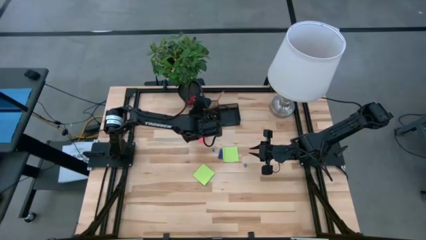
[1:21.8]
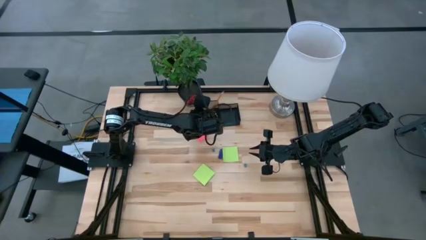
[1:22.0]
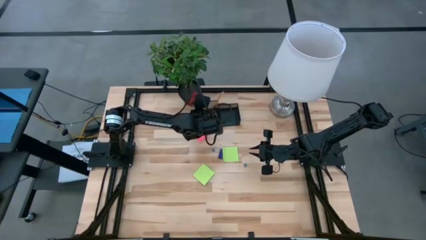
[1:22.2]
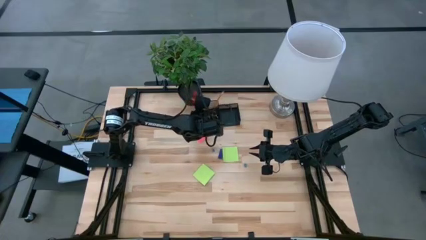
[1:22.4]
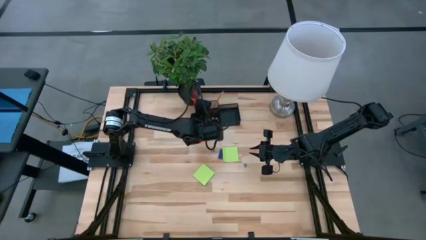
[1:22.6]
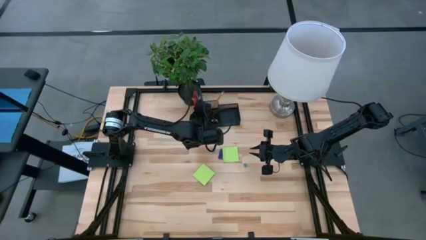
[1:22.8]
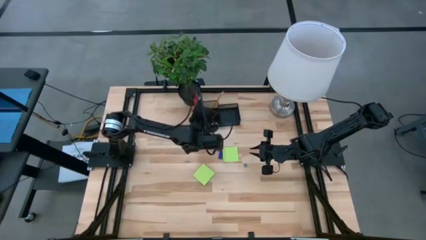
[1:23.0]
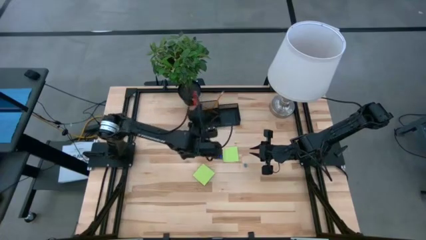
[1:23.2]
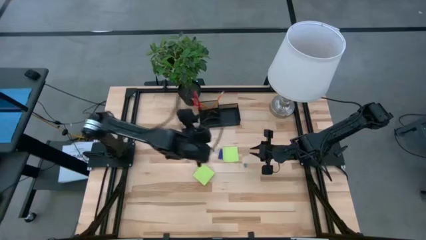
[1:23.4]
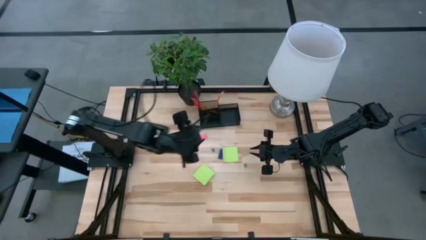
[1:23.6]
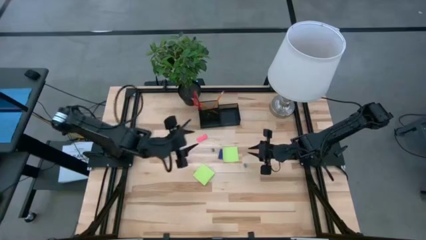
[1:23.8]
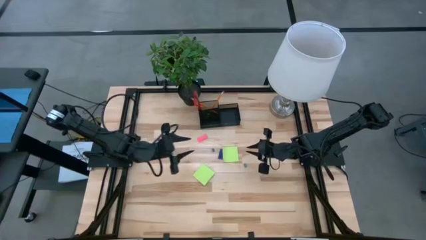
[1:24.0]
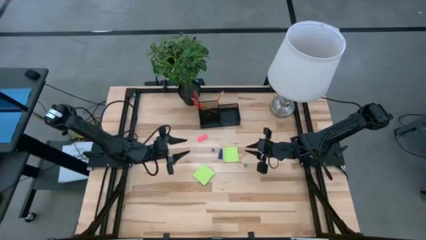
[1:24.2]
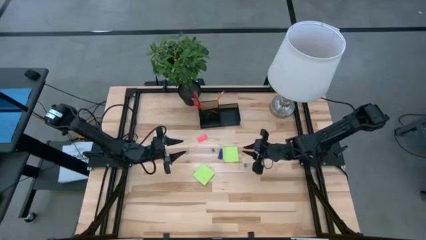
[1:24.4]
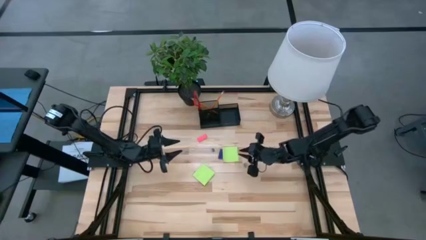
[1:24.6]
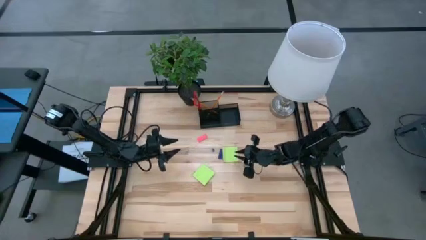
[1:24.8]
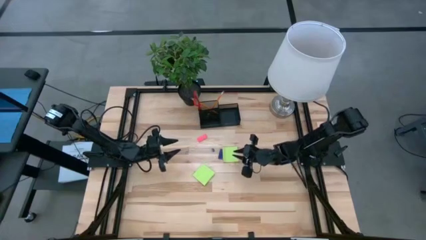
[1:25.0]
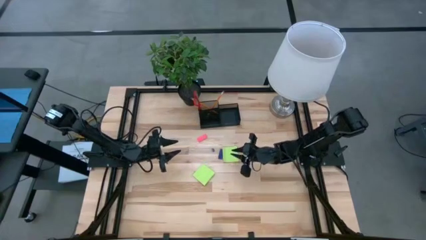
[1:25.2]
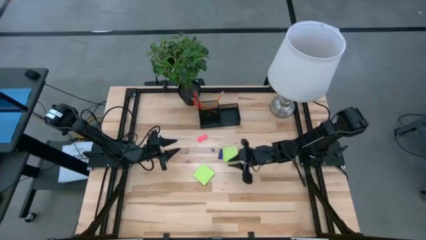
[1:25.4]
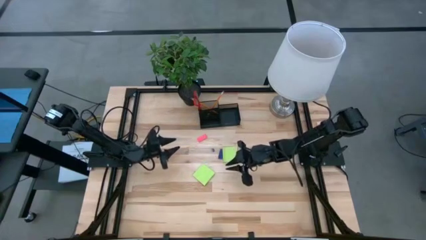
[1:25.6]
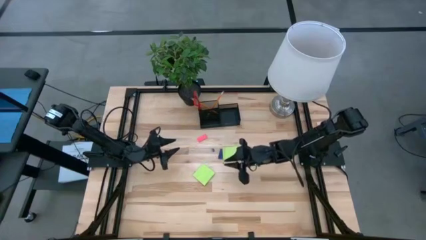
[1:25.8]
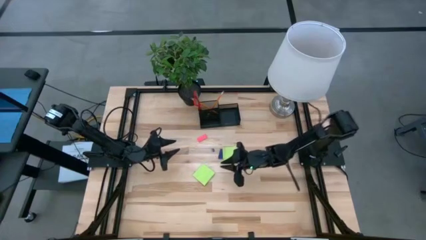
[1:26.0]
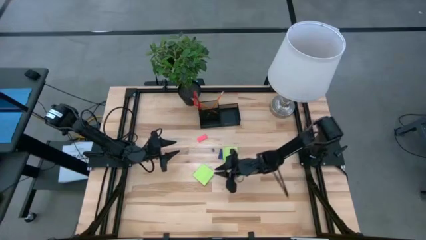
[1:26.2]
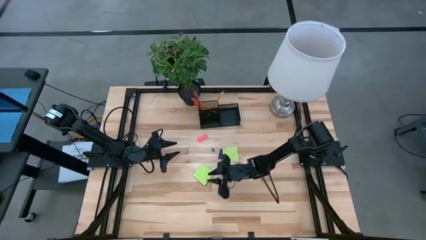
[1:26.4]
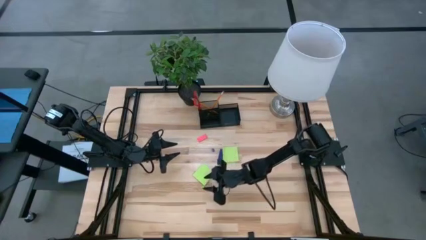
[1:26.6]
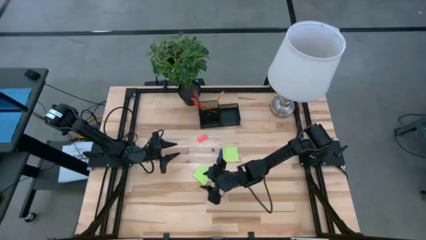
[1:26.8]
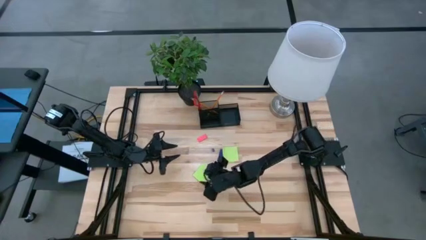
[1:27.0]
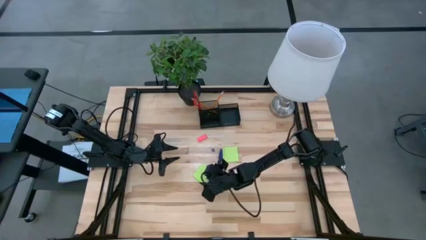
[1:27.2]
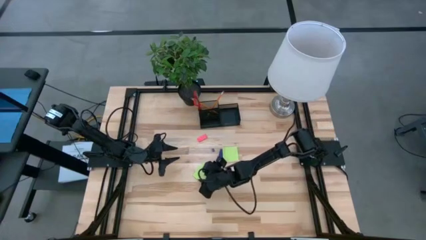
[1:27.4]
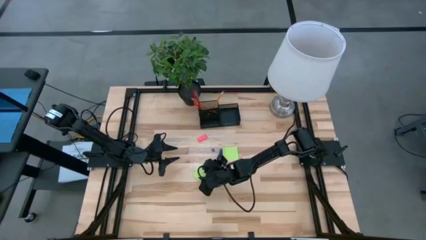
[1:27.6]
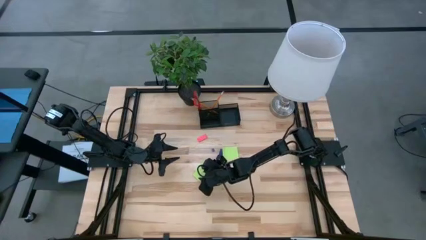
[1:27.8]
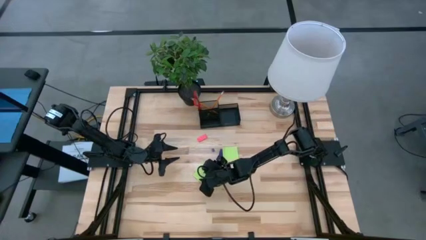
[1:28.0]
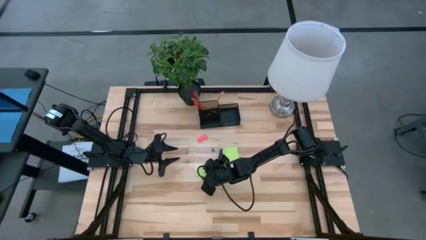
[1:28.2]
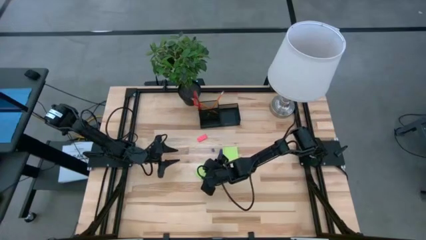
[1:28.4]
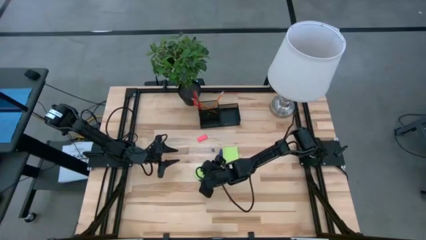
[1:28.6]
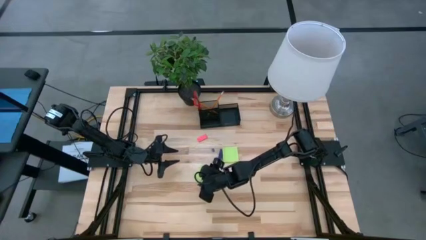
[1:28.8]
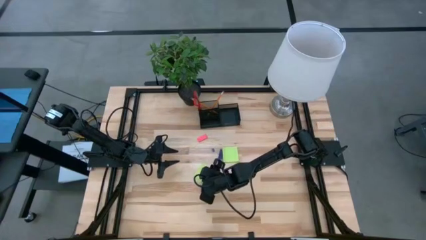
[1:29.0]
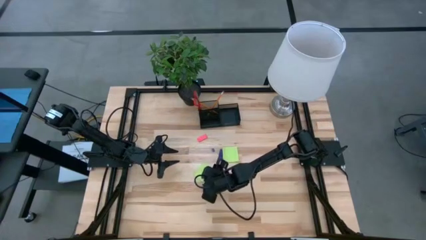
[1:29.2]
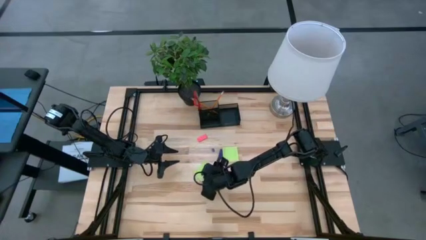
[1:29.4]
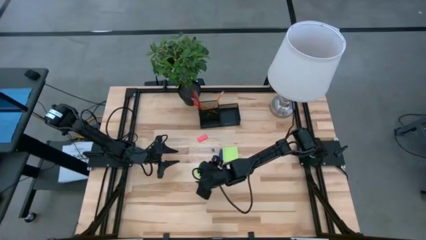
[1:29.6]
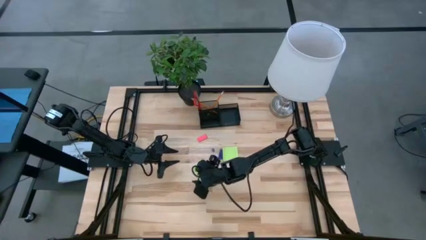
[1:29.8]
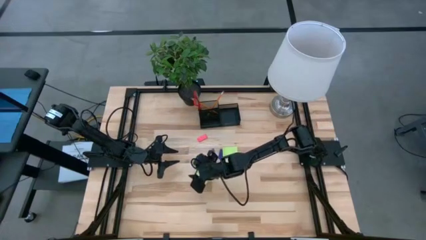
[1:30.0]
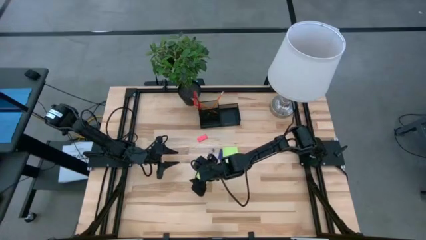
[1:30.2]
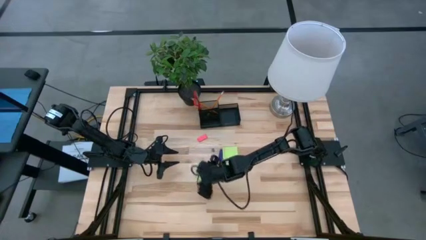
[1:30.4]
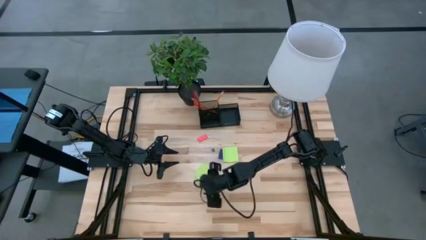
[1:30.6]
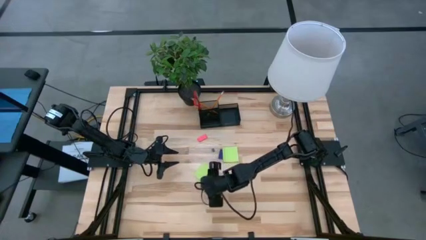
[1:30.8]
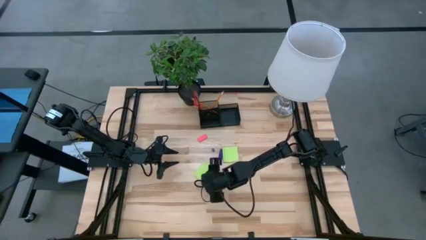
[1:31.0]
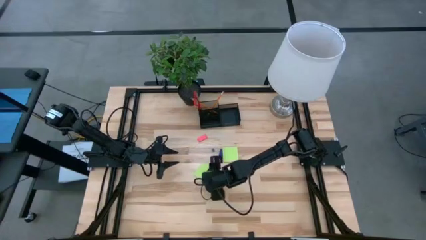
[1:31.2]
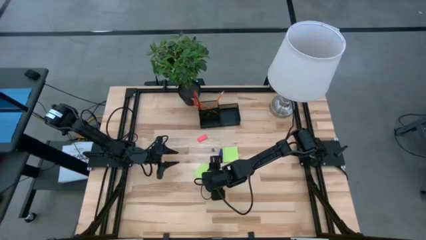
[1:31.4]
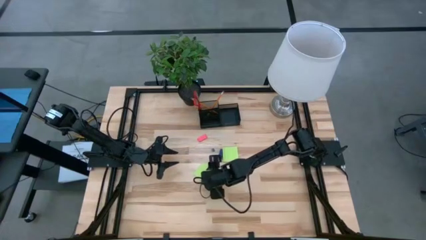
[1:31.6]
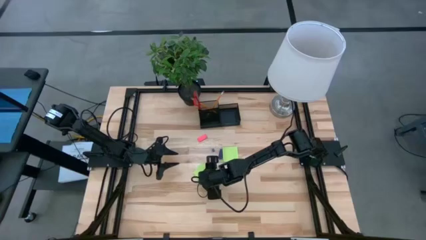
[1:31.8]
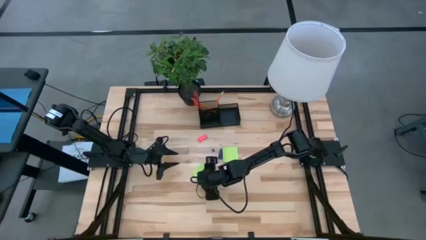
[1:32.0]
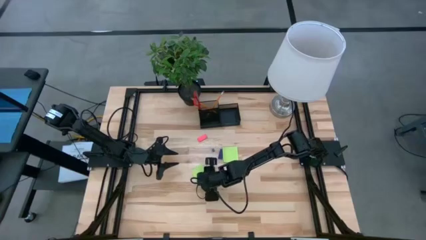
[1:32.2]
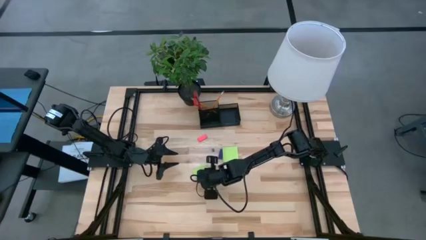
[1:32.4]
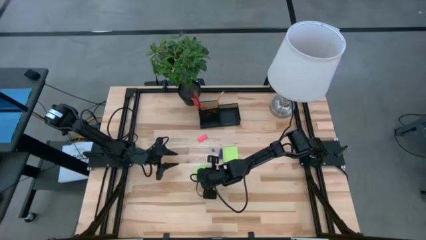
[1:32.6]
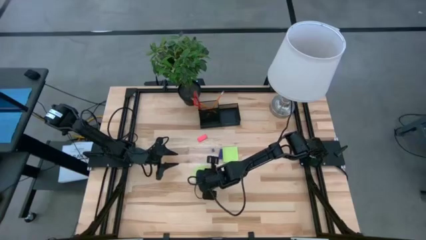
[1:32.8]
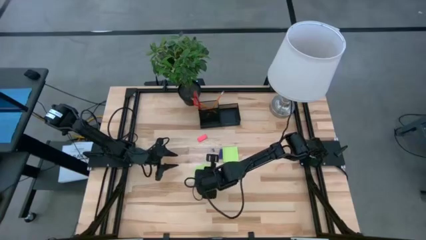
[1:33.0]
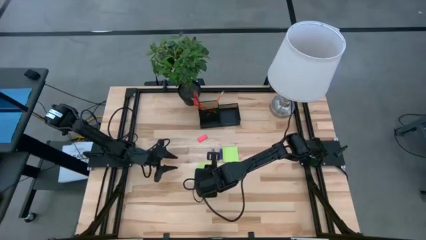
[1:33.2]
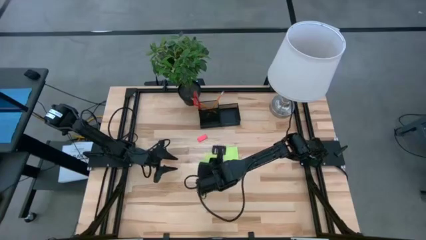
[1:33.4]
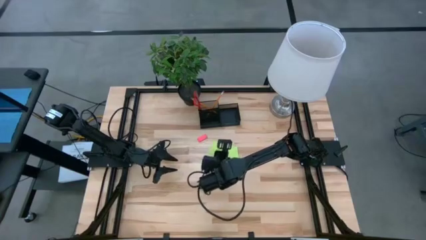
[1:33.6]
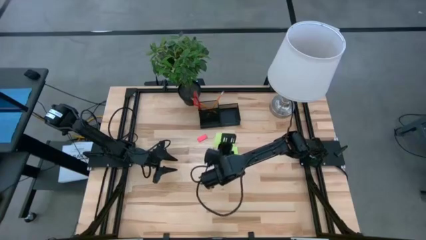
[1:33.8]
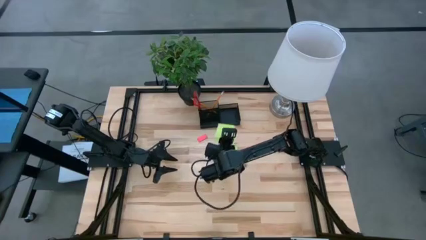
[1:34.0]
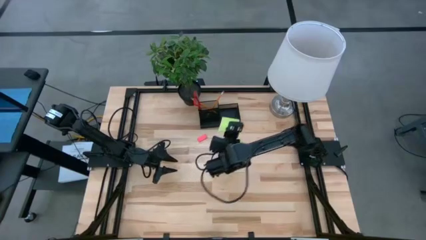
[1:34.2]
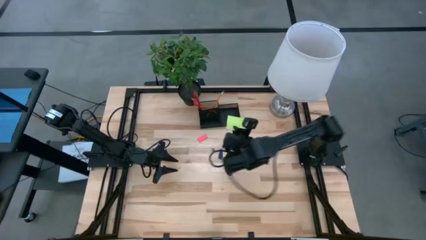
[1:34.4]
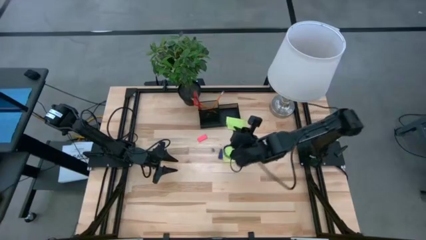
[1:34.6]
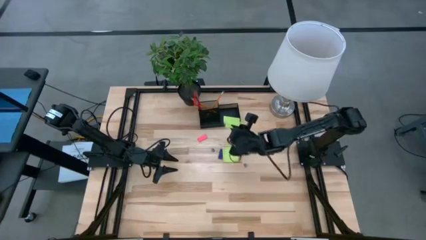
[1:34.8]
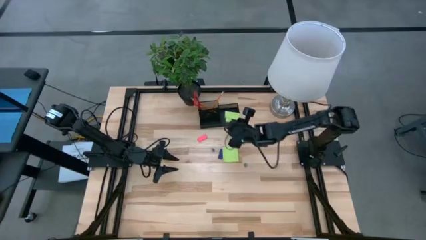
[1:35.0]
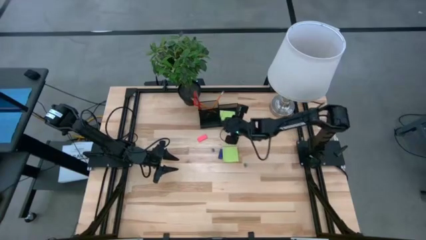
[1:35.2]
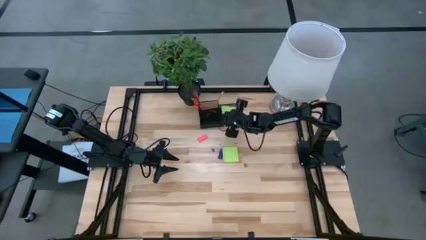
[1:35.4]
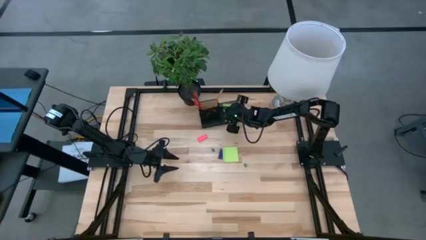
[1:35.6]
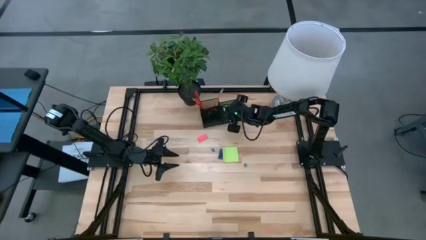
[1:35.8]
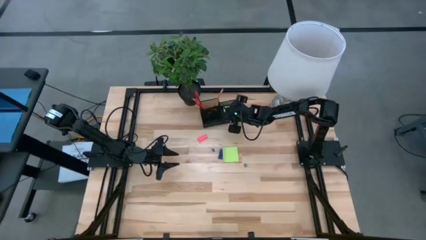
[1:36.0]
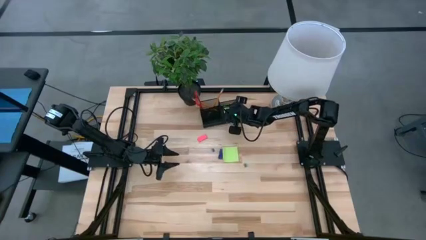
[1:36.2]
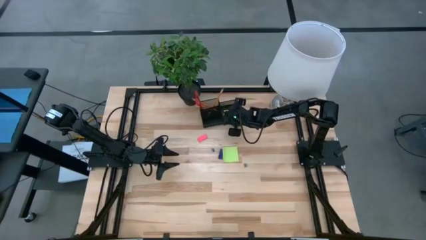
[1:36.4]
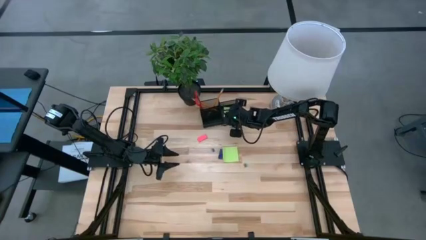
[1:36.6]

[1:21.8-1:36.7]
Task: Pick and place office supplies into organizer
Put the bottom green sticky note into the desk organizer
